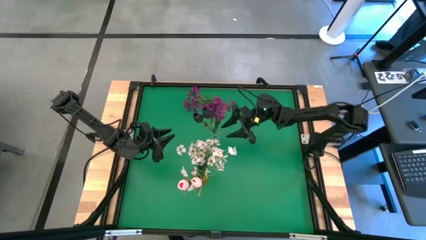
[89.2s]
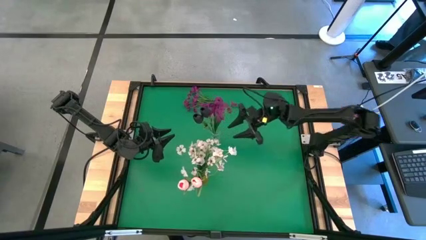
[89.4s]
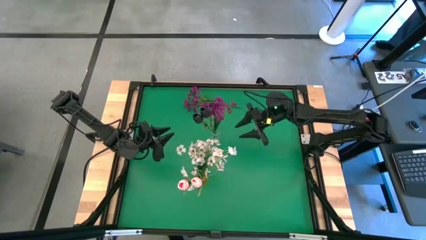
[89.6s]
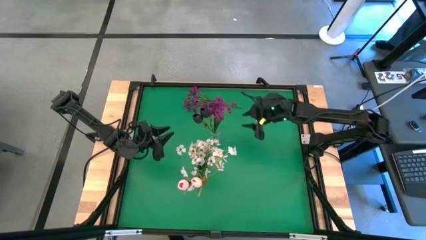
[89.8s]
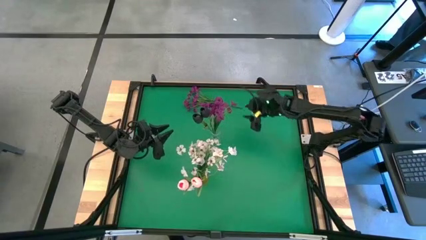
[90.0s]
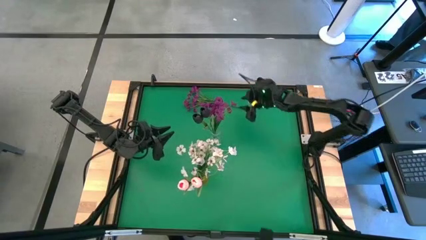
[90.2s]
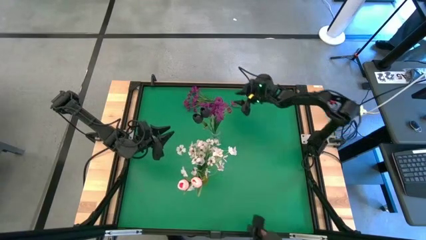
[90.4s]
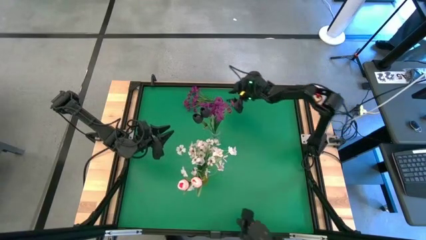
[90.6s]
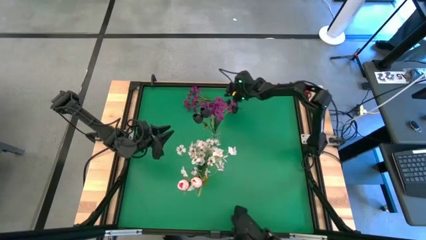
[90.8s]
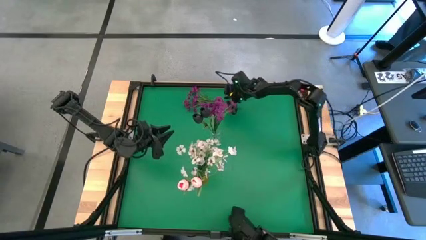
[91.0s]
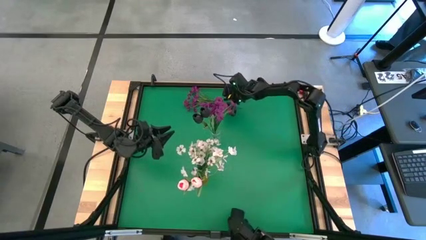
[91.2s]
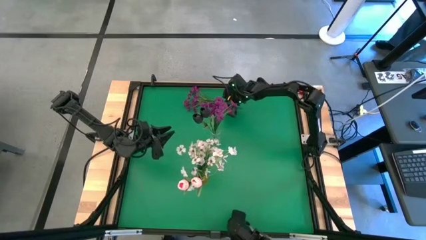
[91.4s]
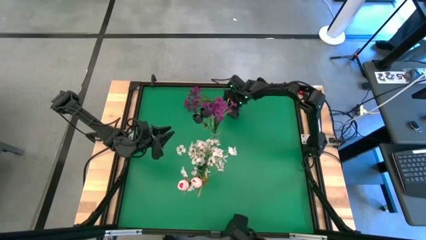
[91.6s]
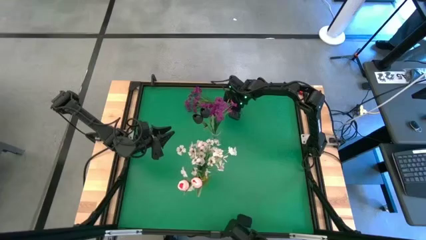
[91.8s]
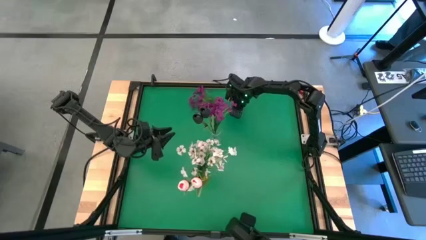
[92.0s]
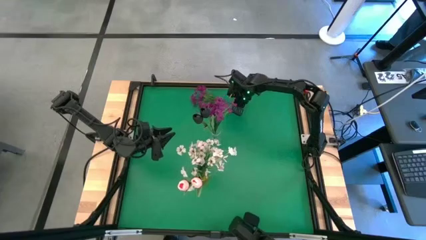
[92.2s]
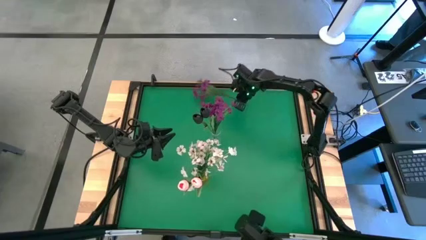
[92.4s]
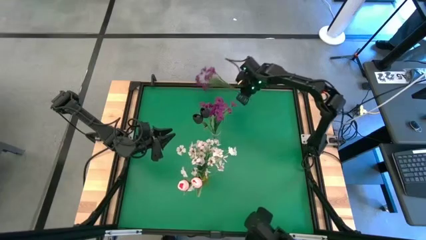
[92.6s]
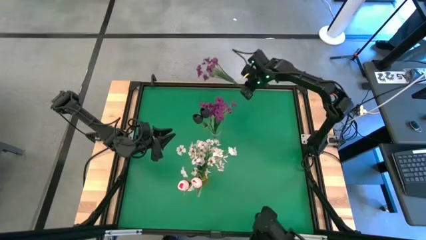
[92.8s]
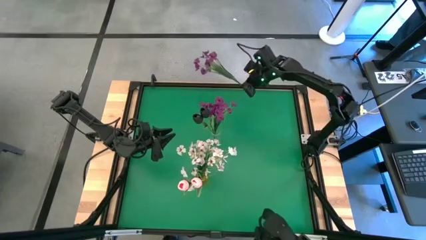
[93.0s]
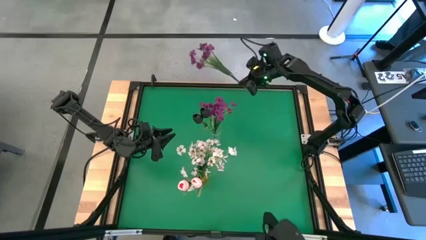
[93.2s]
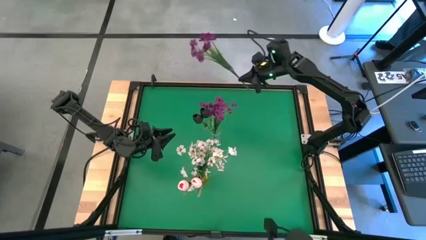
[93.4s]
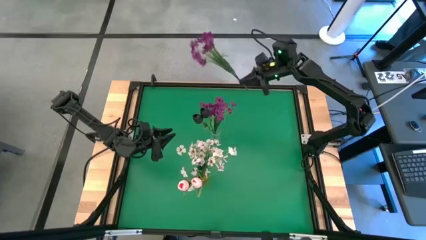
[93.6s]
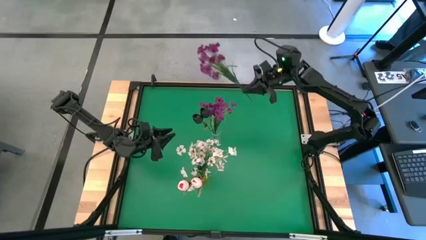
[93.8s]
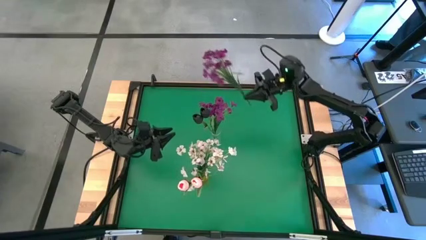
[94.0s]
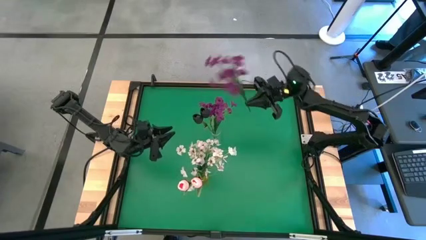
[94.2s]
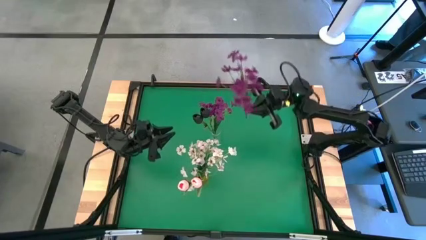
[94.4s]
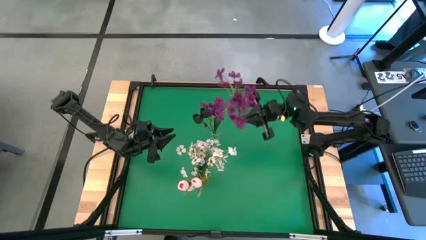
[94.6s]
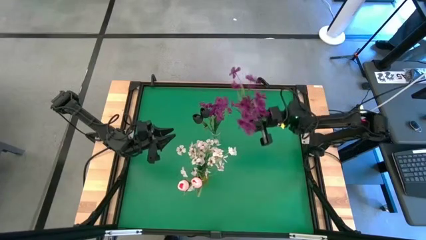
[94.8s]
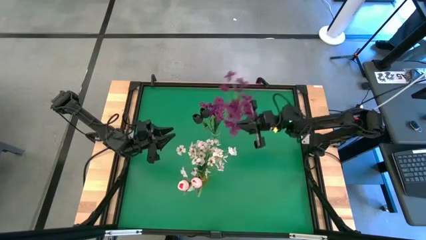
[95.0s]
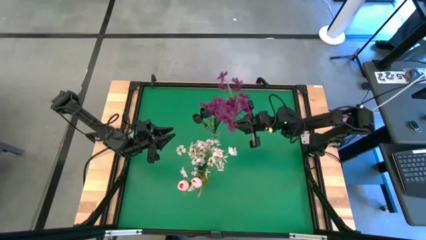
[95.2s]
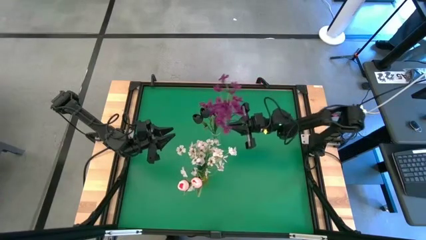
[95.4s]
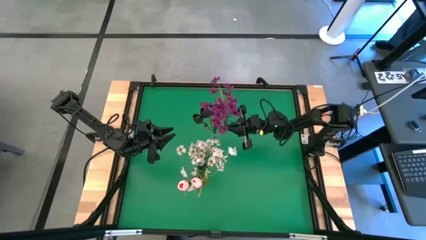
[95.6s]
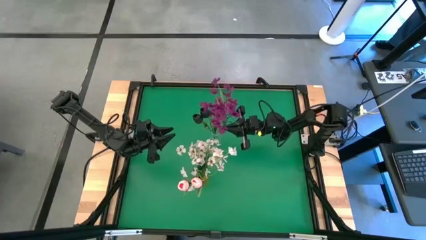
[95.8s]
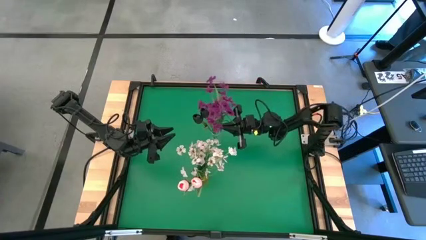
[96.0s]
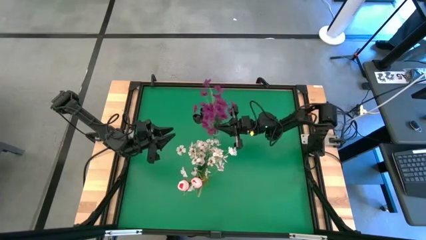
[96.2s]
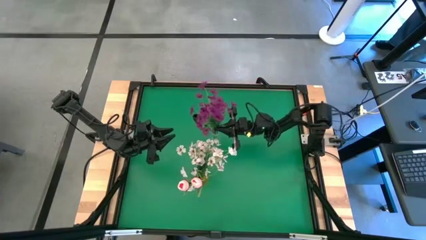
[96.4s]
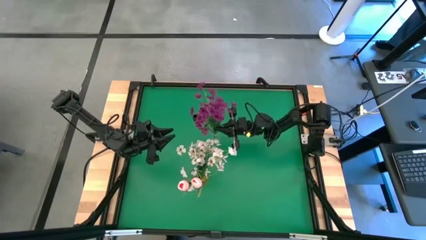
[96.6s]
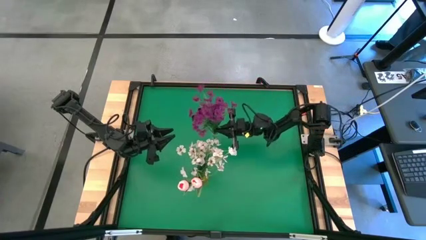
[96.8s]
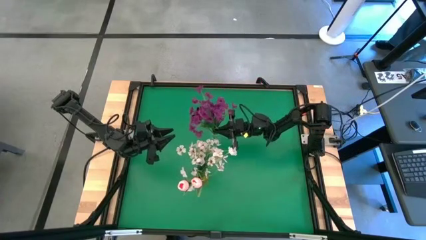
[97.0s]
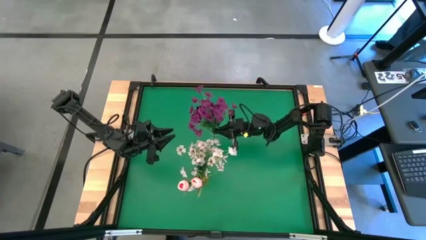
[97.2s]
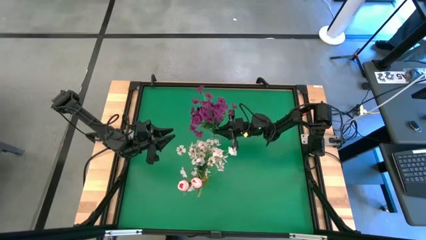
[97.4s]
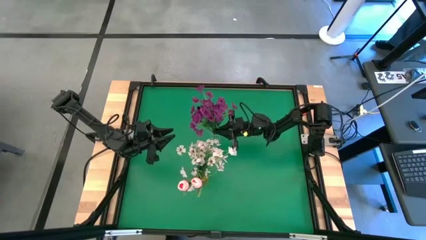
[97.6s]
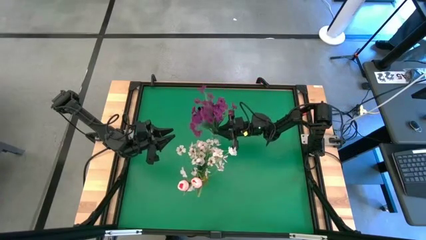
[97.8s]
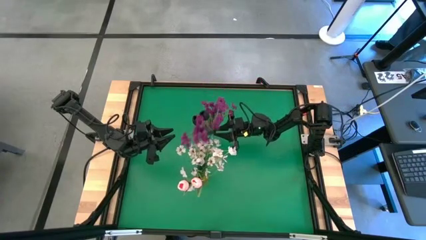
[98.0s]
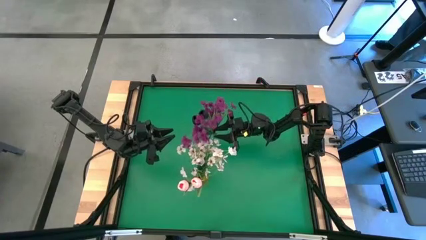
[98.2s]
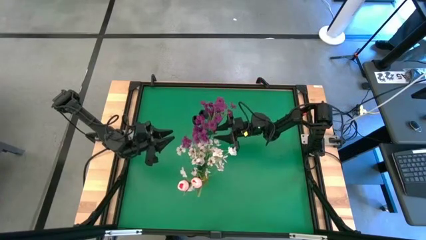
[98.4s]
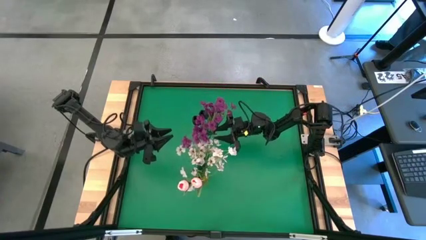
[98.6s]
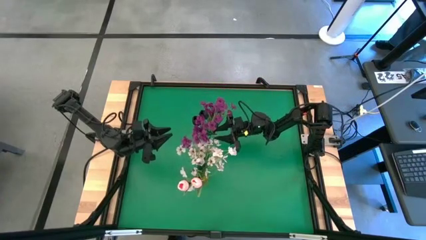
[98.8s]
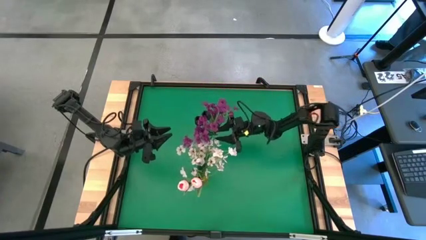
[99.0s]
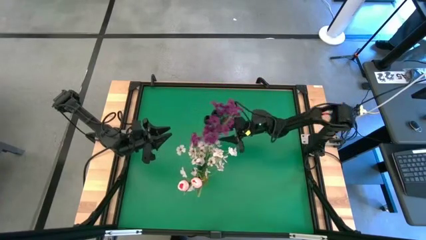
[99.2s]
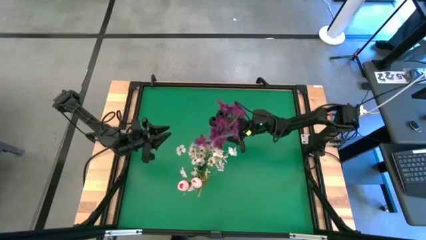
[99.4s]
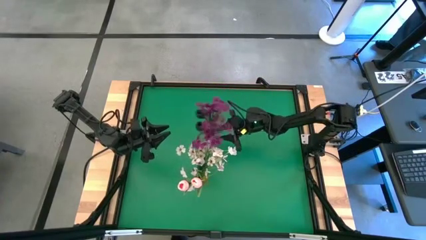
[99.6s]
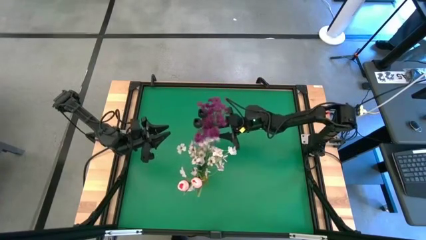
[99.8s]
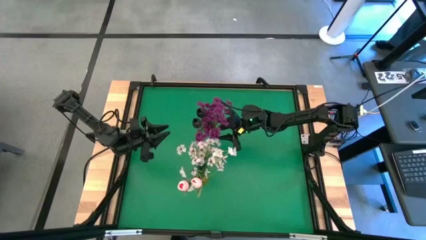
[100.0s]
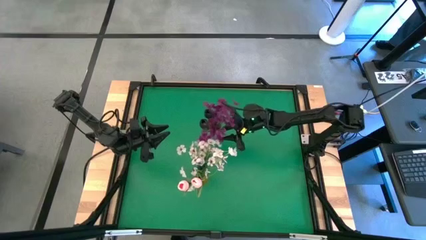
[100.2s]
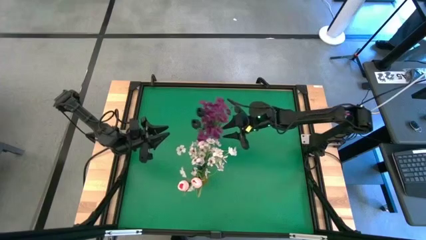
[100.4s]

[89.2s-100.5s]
Task: Sort flowers into vase by color
Put the purple flowers into the transparent vase

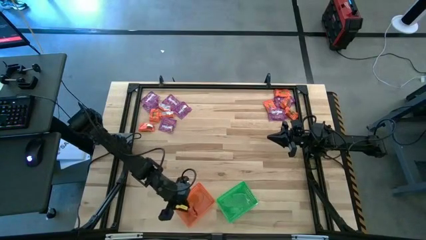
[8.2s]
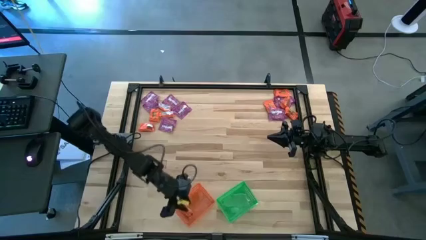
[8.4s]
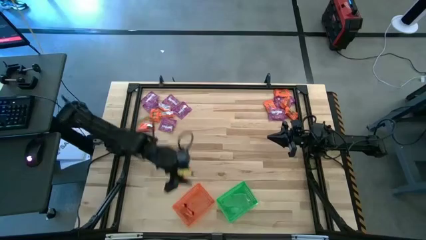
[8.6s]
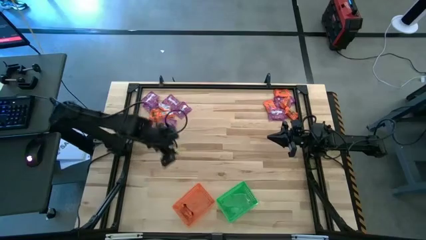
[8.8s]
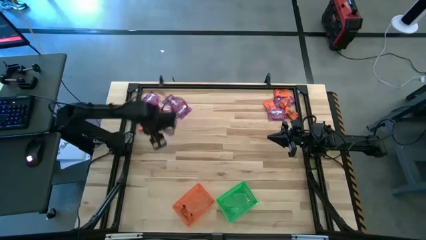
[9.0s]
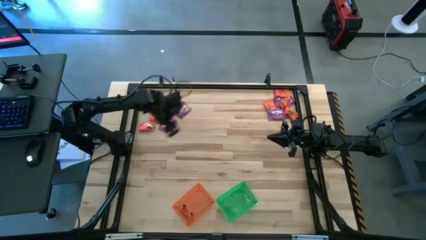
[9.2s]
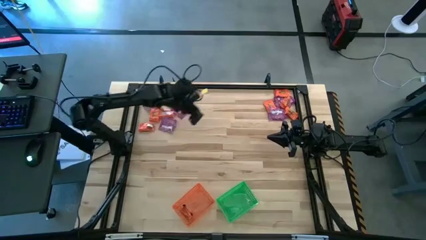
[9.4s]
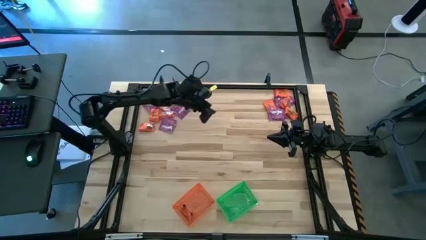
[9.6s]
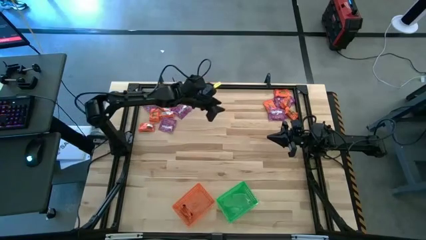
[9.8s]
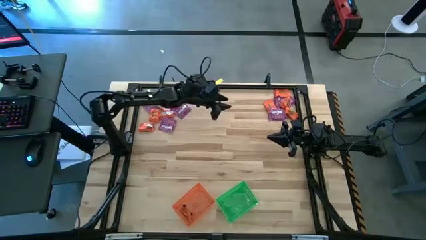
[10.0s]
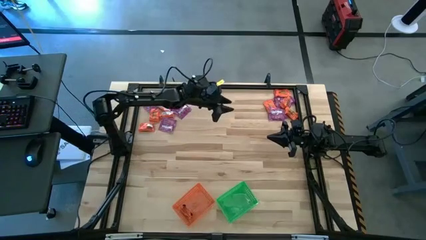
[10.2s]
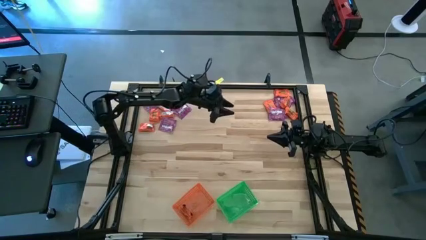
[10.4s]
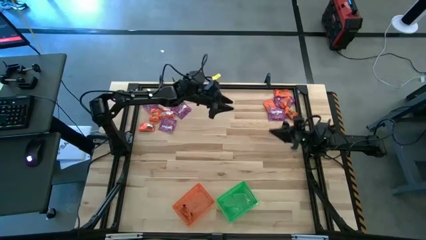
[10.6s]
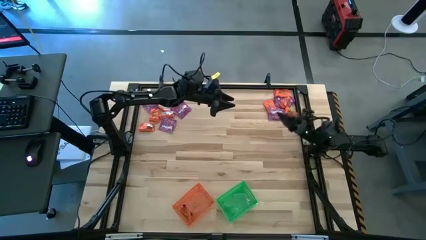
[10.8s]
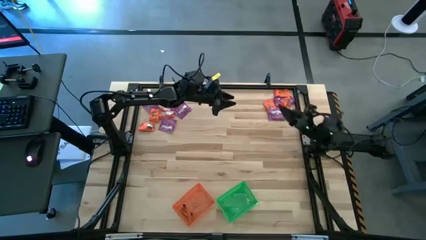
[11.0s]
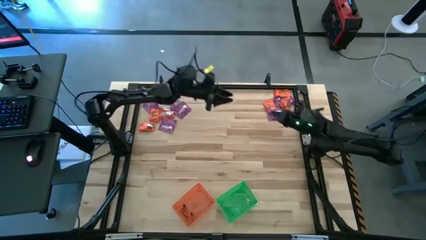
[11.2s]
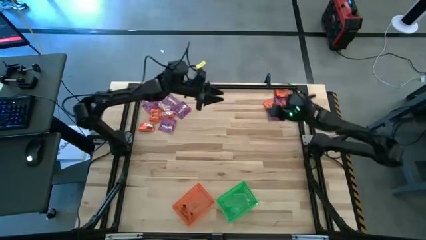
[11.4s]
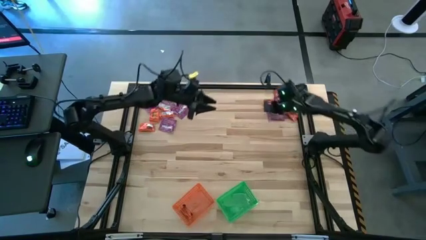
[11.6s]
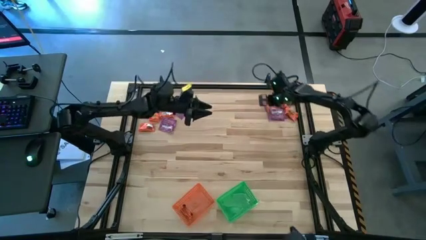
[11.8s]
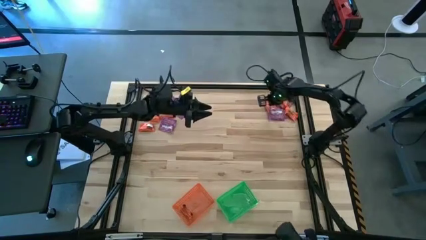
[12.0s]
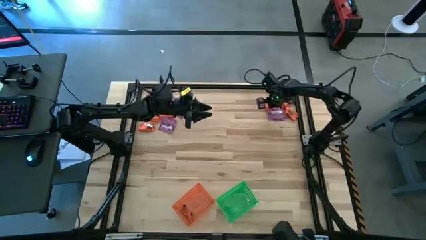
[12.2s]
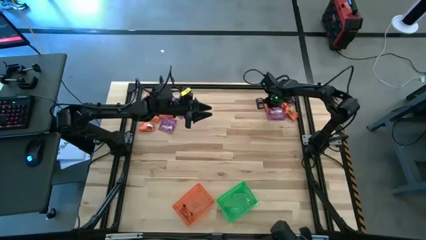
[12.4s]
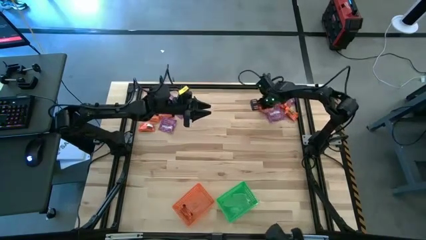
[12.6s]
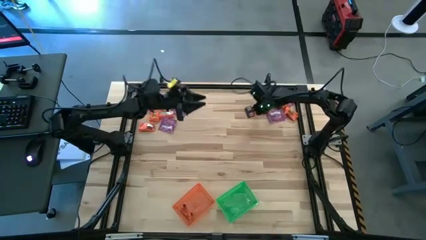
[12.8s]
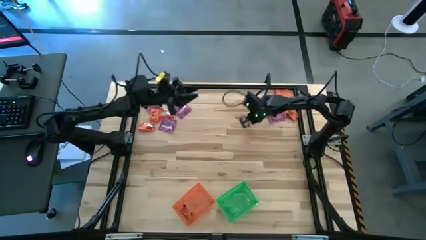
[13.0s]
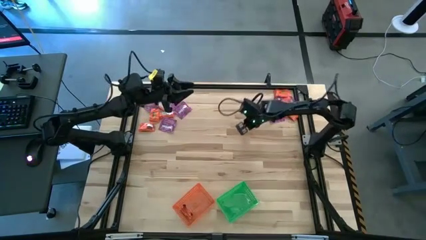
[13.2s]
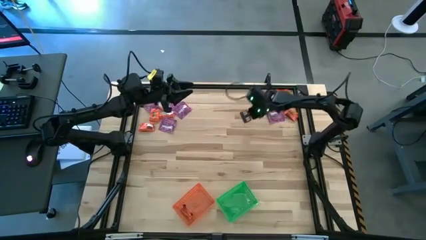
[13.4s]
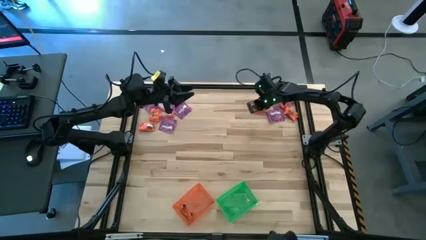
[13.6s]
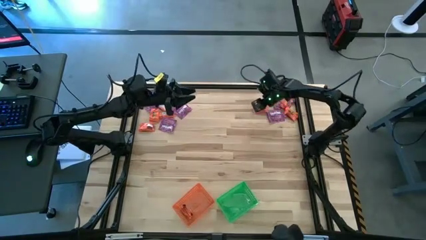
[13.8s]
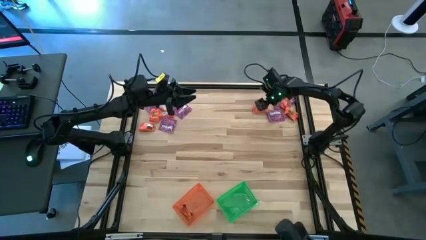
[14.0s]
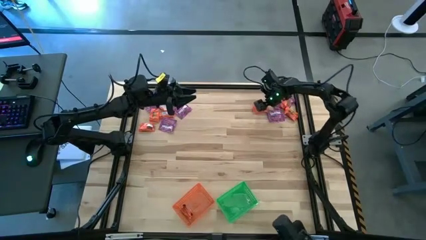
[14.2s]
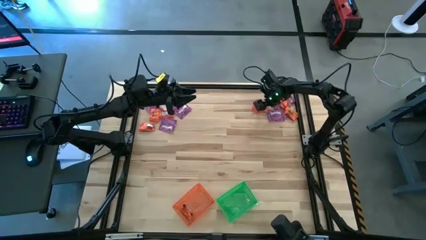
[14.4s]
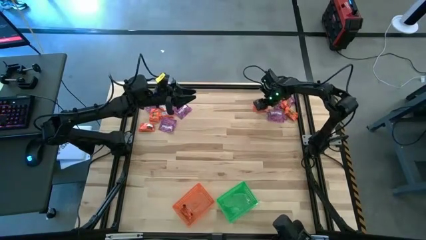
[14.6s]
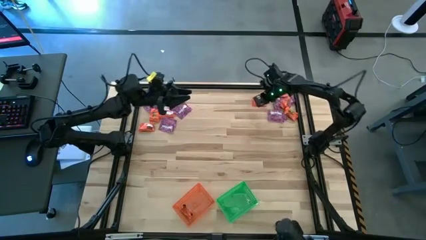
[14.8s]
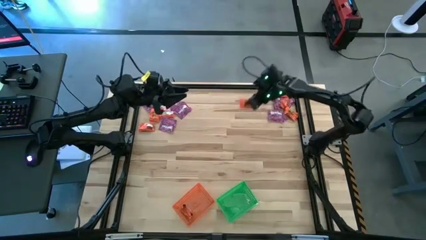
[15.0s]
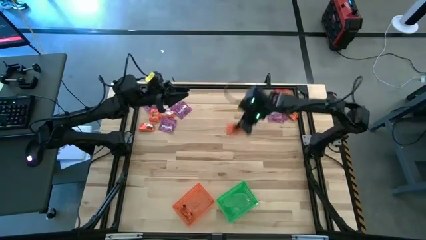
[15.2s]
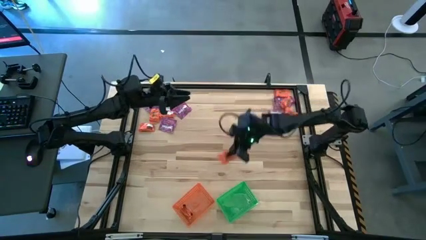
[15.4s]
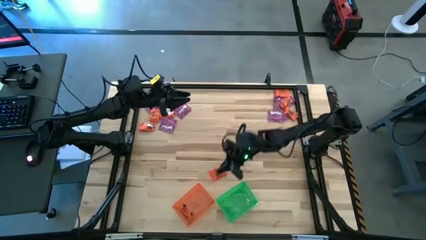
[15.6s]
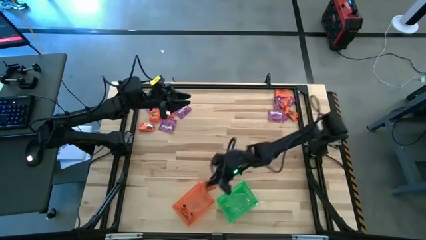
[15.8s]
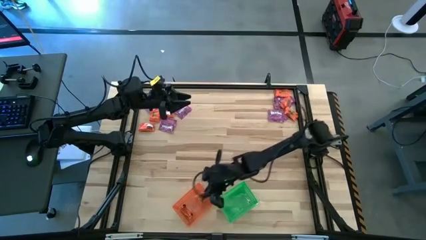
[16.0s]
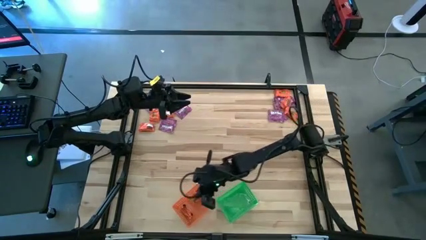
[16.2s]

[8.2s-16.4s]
Task: Sort candy by brand, put in halloween buckets
Put the orange candy into the orange basket
